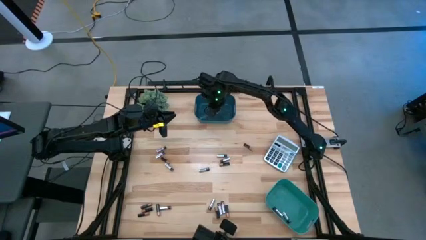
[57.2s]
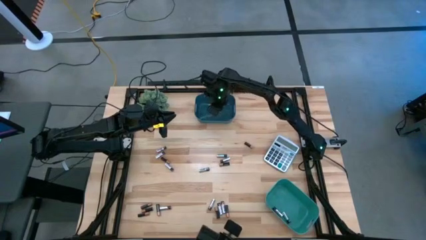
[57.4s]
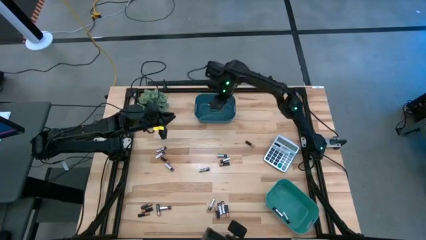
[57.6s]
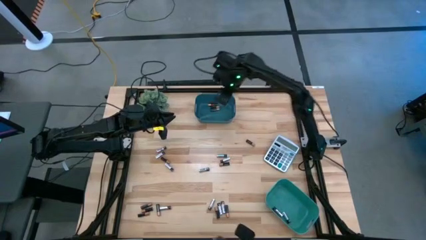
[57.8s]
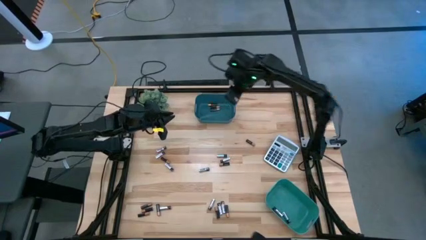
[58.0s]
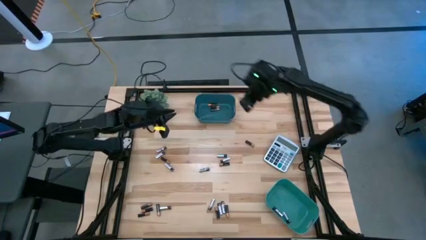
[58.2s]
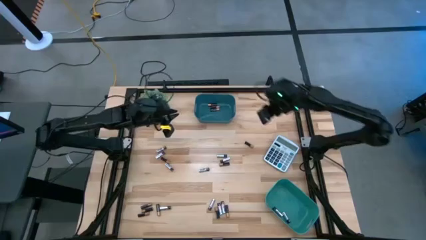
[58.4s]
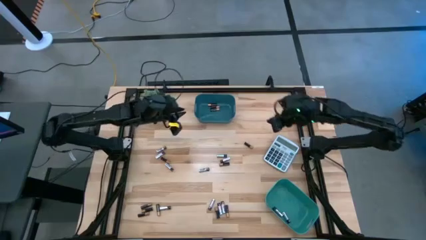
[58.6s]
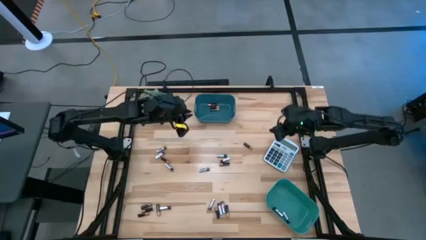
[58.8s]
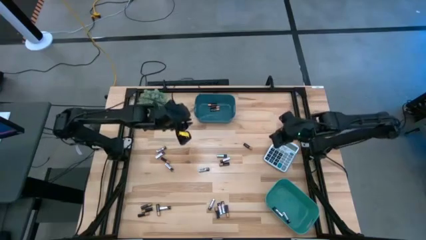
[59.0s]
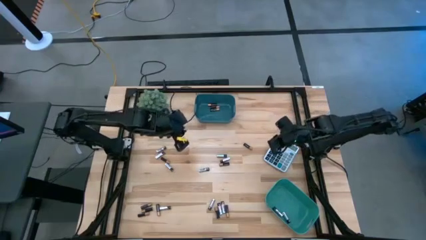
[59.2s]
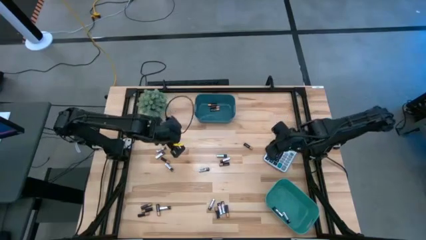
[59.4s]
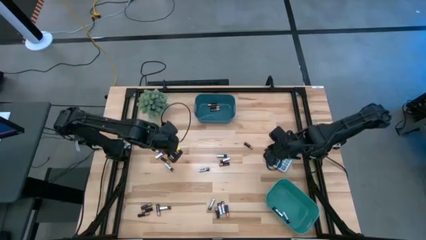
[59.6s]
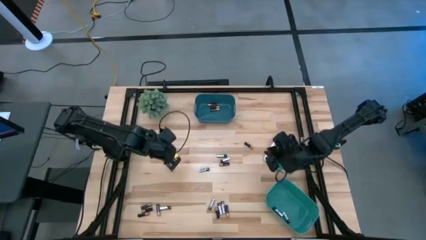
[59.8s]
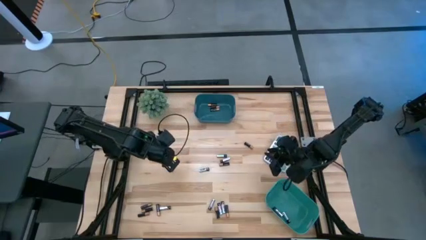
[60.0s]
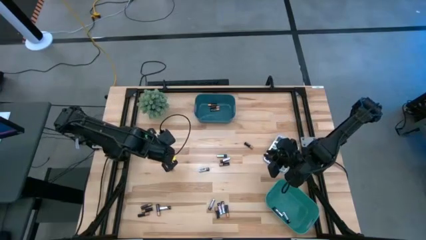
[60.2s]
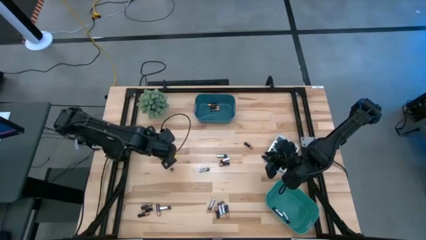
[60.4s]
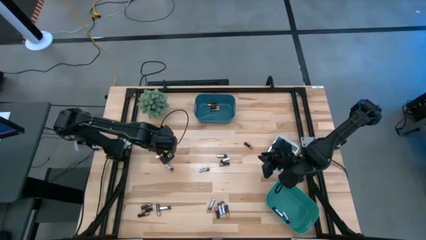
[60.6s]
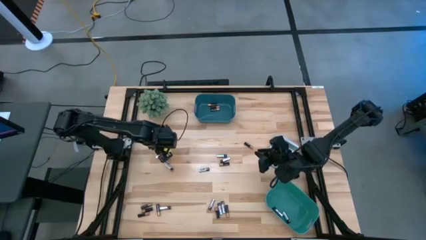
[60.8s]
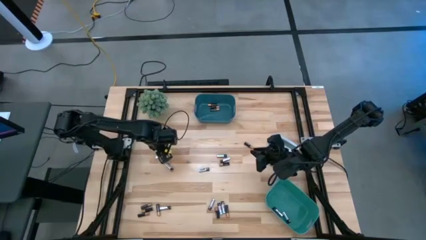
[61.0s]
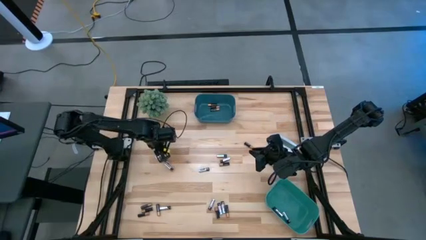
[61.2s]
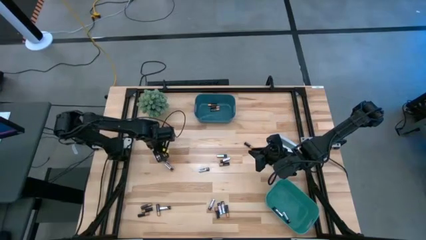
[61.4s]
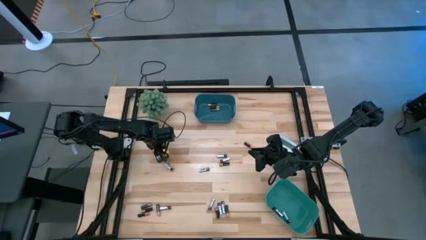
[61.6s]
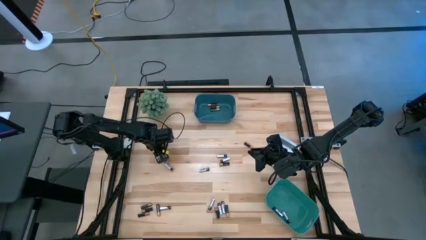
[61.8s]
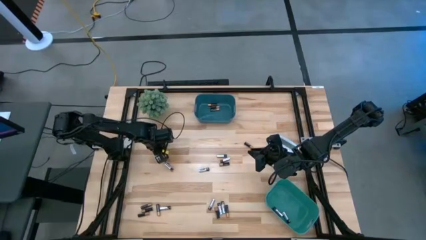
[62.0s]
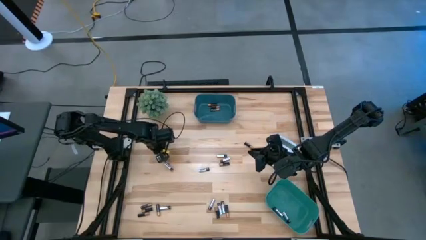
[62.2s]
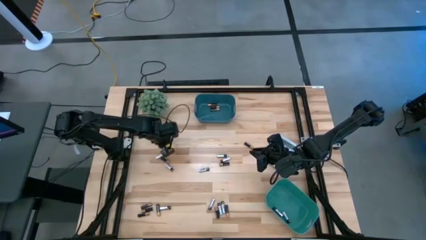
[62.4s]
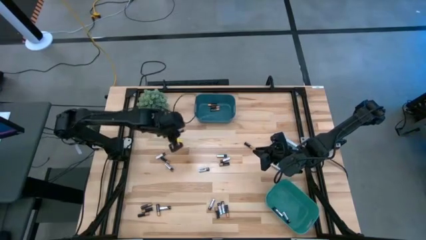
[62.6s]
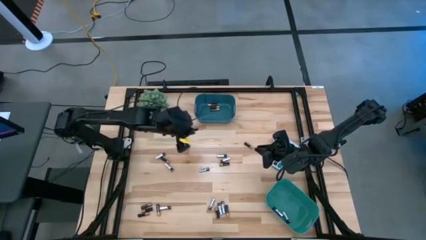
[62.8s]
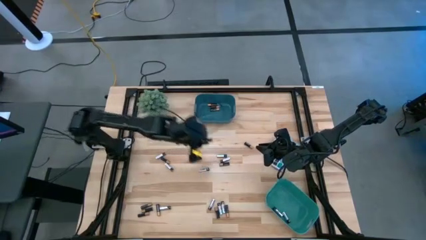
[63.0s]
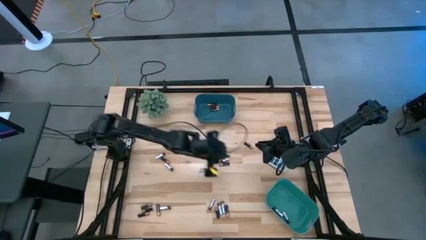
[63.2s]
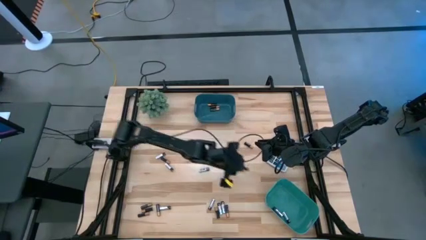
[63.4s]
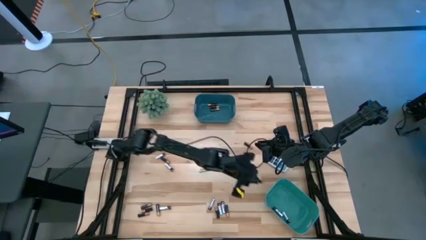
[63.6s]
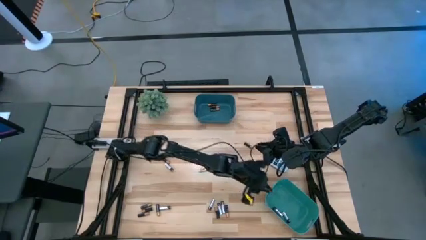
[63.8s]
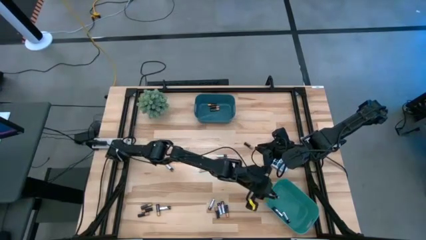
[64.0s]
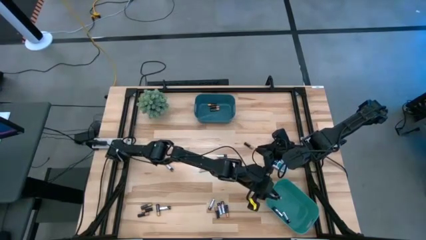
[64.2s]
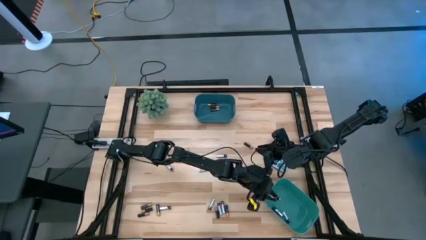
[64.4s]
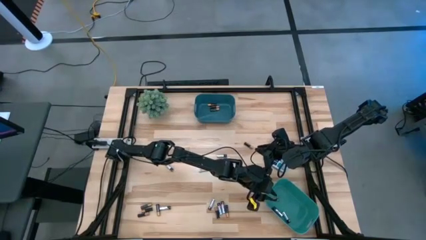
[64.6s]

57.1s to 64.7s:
Task: Sort batteries
Put the silver battery into the green bin

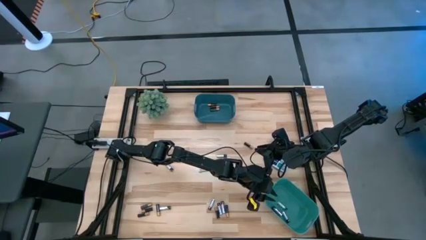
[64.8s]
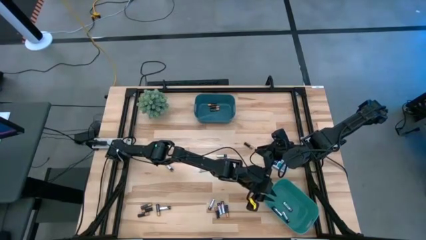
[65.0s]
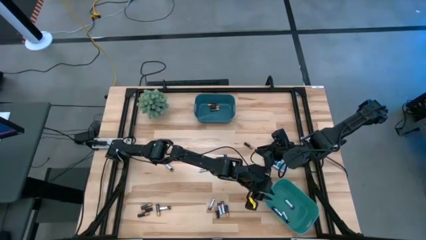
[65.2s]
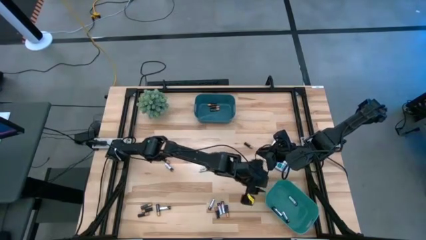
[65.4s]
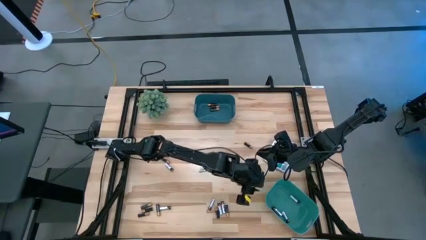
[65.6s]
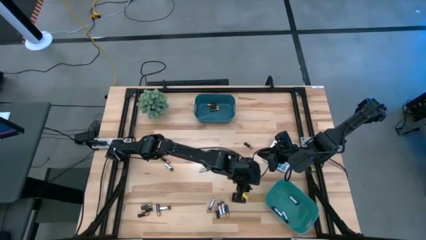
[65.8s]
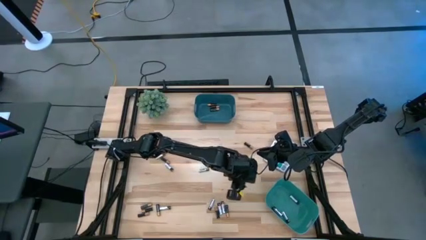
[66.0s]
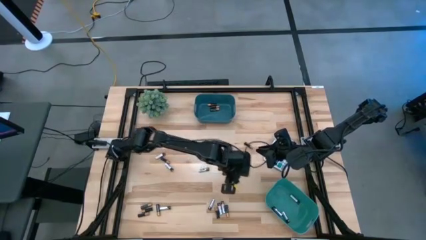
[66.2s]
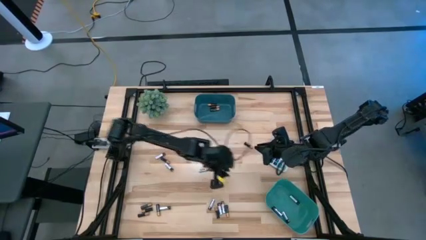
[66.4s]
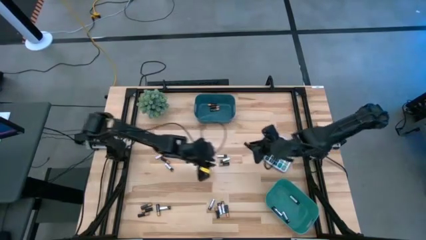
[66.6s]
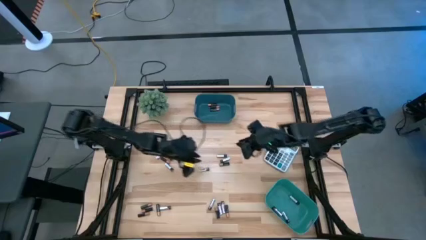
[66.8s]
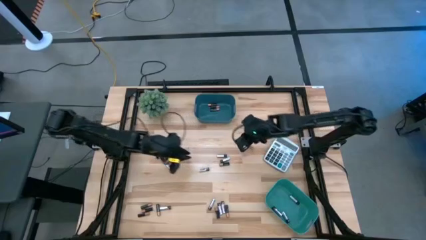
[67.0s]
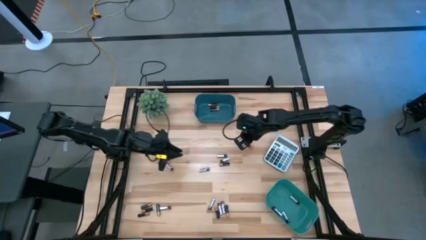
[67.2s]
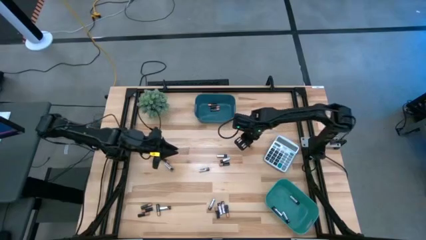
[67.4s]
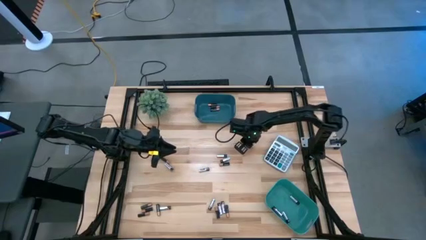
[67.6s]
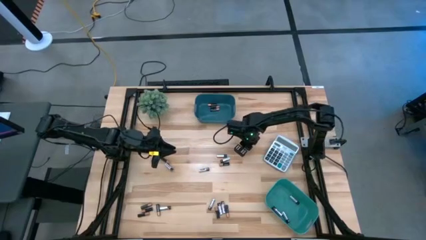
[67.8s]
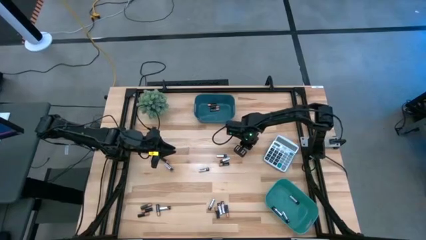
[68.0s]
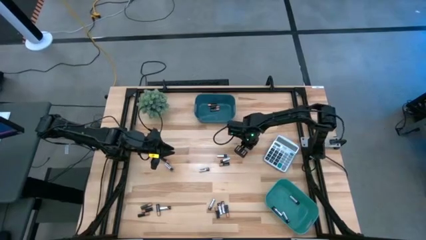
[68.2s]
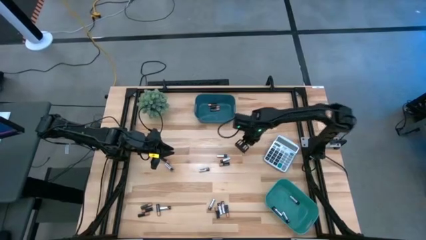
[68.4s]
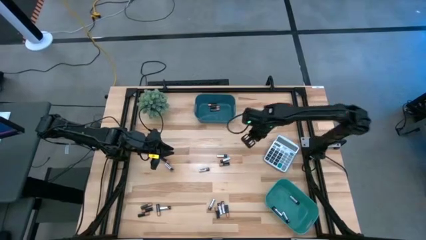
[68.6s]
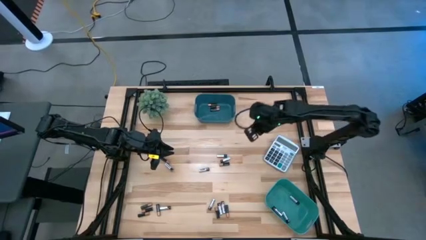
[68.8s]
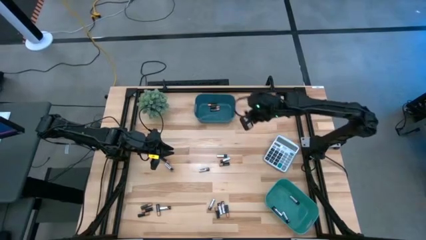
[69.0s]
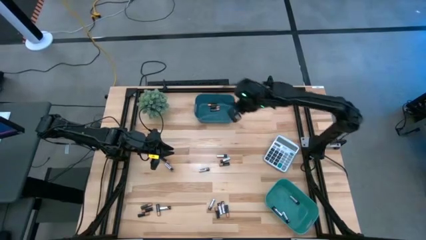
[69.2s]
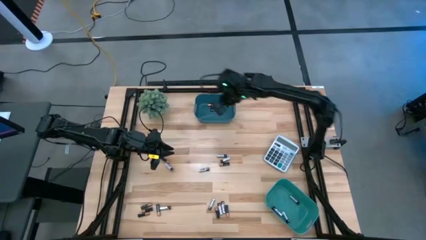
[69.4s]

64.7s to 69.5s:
Put the black battery into the blue bin

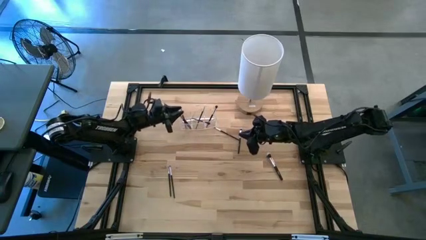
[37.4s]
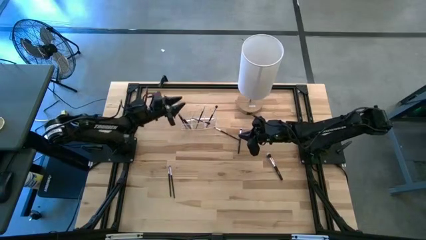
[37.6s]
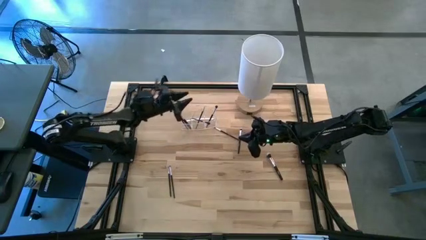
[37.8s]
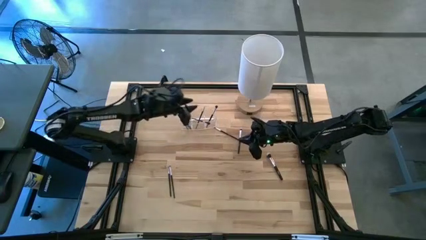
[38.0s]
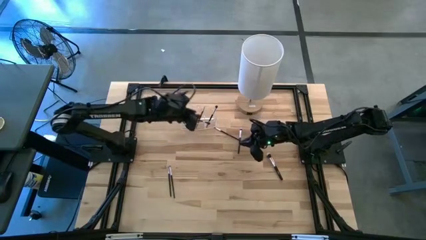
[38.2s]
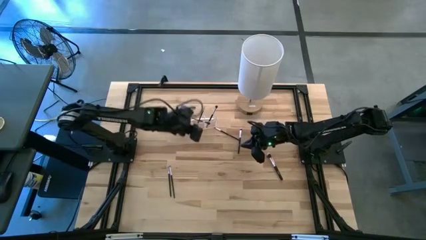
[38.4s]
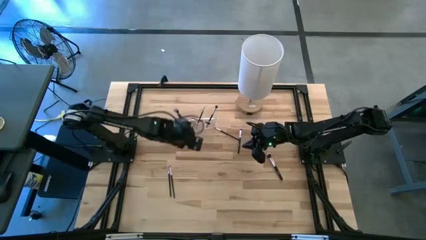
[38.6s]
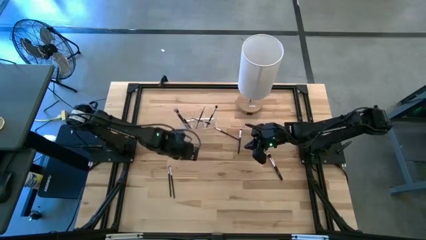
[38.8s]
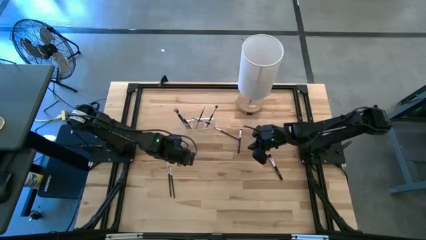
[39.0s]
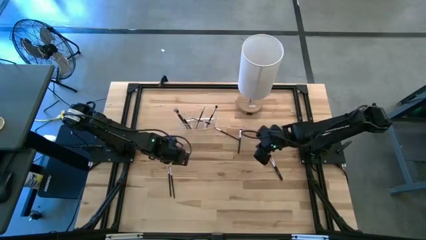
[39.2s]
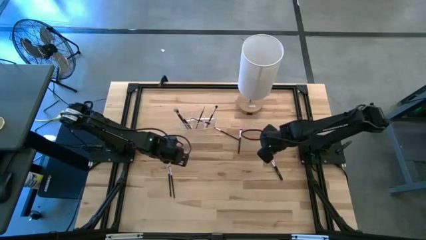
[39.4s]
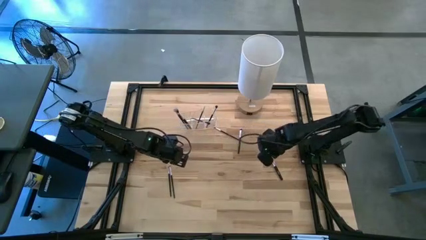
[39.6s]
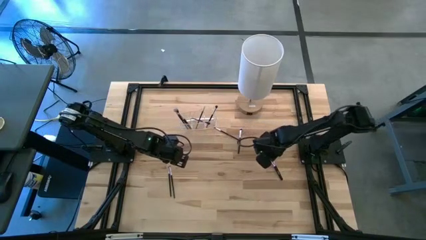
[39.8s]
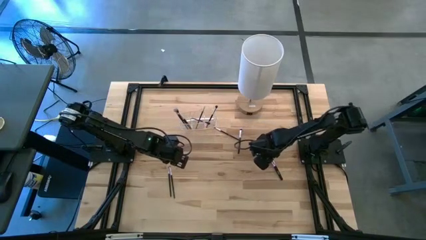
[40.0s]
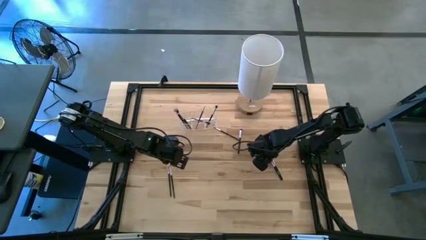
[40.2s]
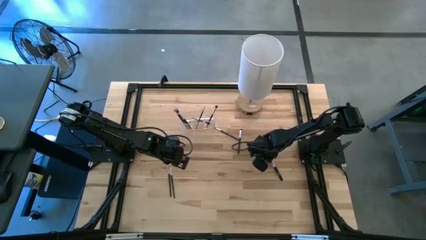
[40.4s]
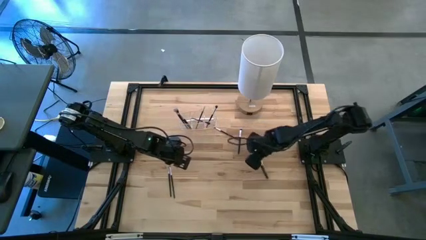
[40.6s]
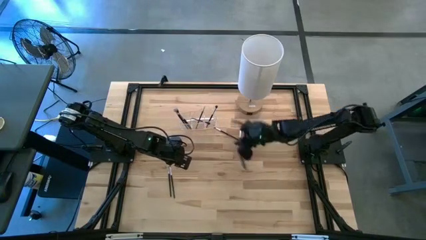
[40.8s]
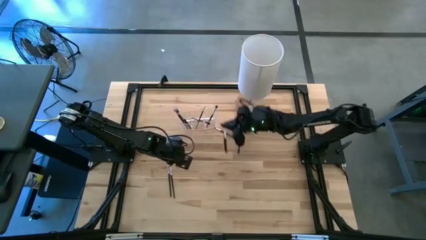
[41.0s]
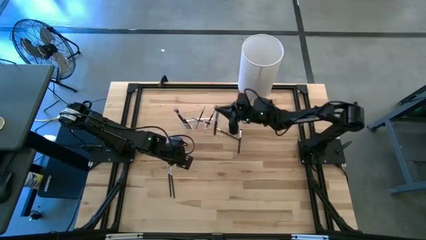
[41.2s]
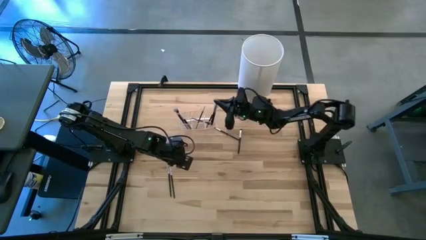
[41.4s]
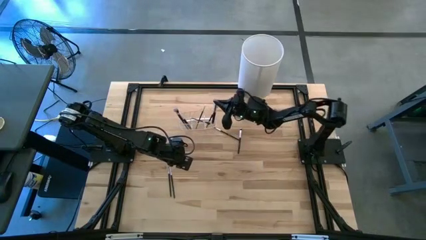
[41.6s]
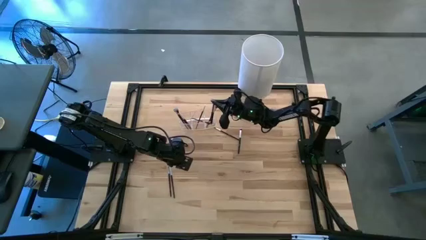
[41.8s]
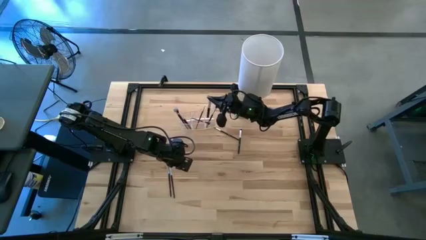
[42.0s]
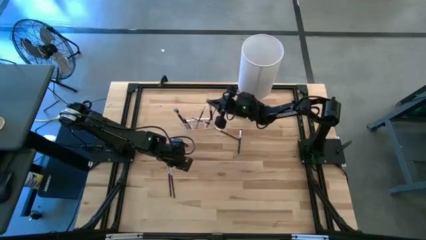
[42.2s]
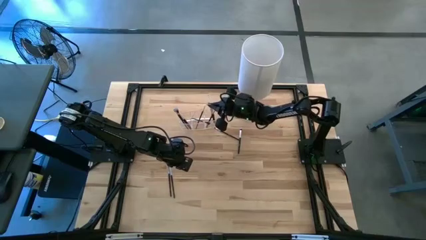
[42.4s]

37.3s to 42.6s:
Task: Put items in baskets/containers
Put the black powder brush into the transparent organizer
